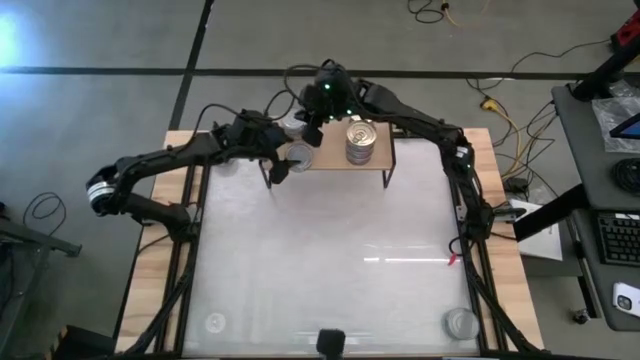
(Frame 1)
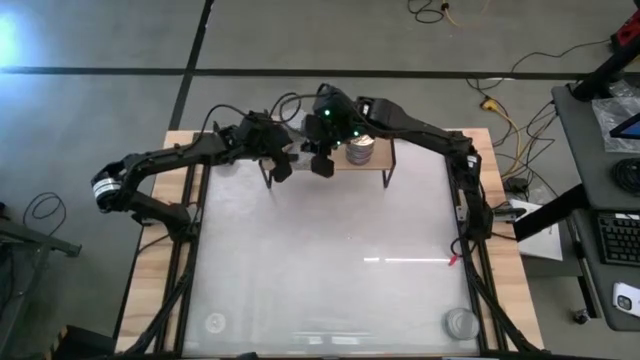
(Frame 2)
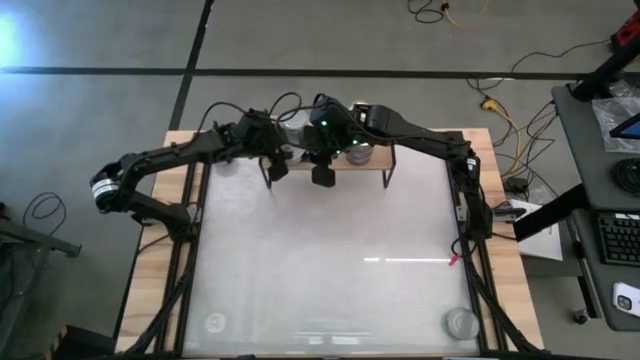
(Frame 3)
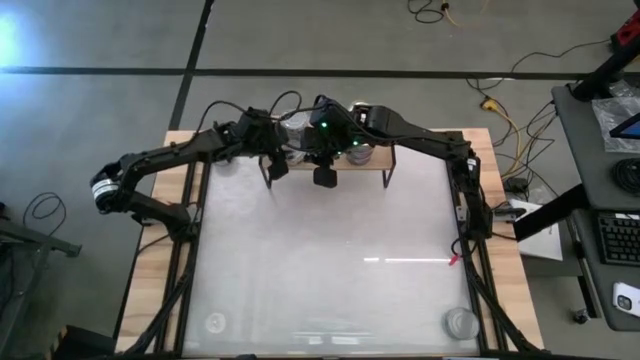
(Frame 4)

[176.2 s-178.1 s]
Task: Stack canned seafood by type on shelf
Adjust the green tuna can on the shelf

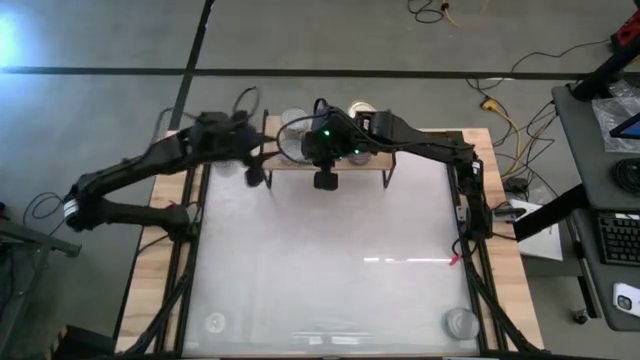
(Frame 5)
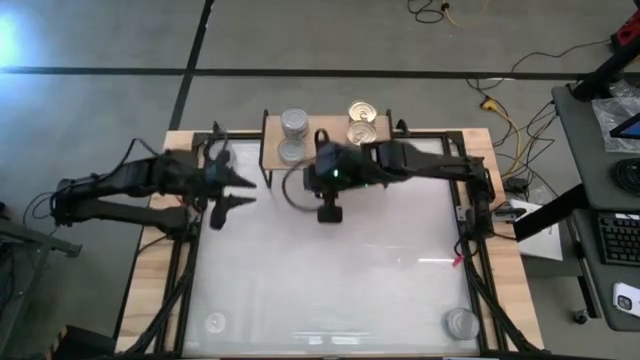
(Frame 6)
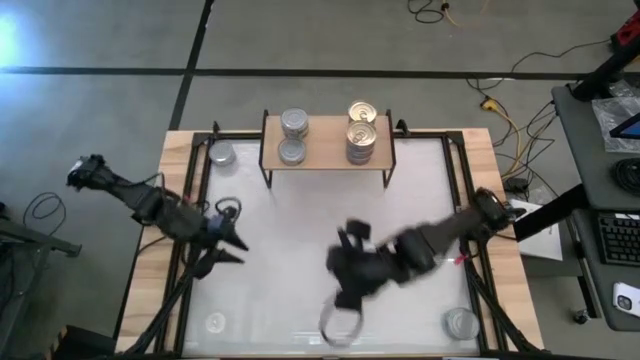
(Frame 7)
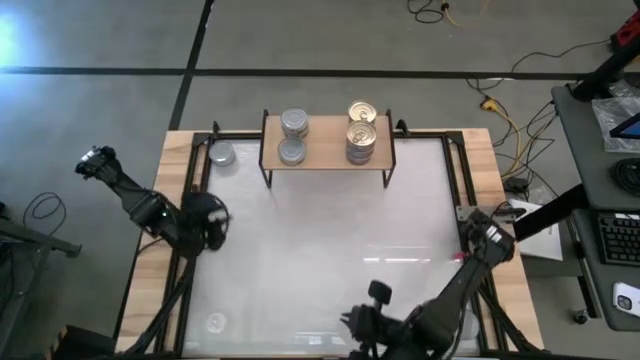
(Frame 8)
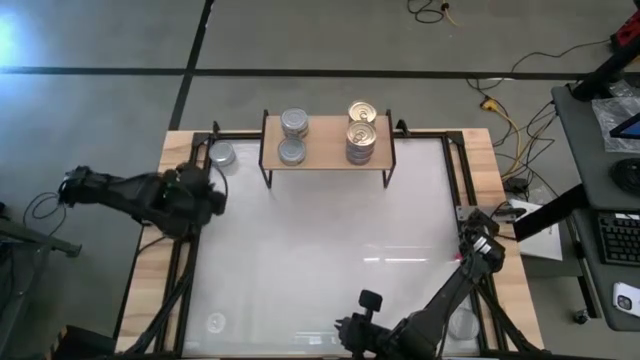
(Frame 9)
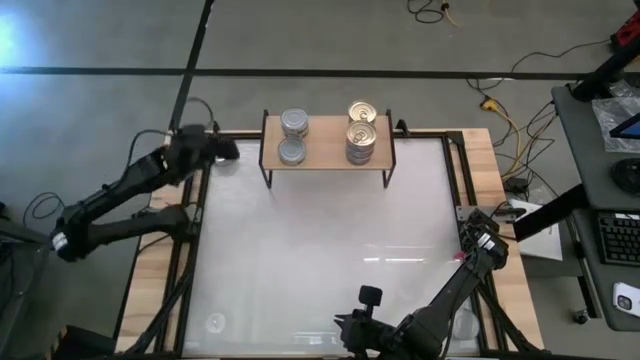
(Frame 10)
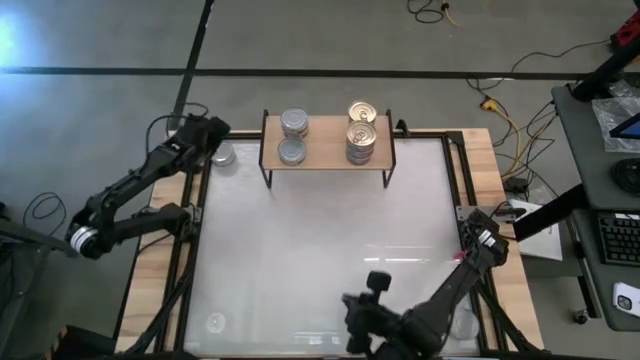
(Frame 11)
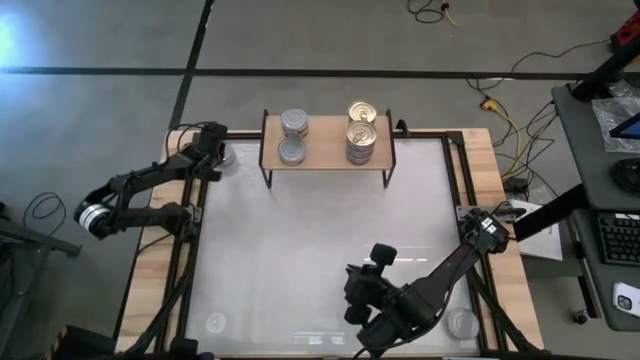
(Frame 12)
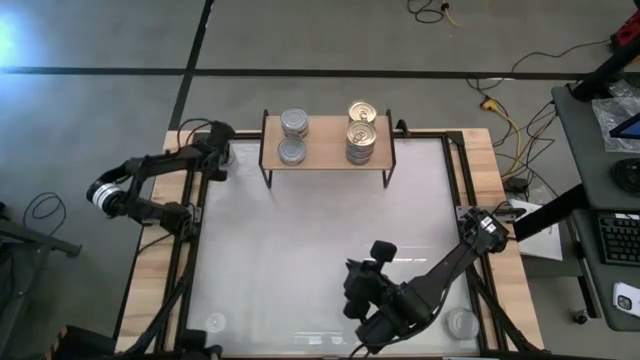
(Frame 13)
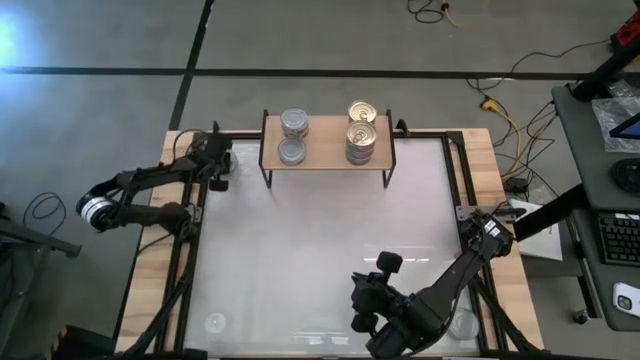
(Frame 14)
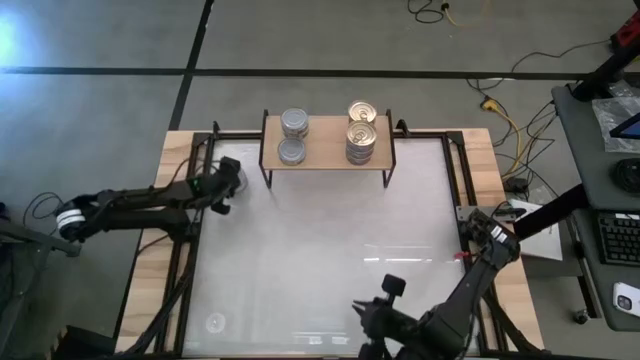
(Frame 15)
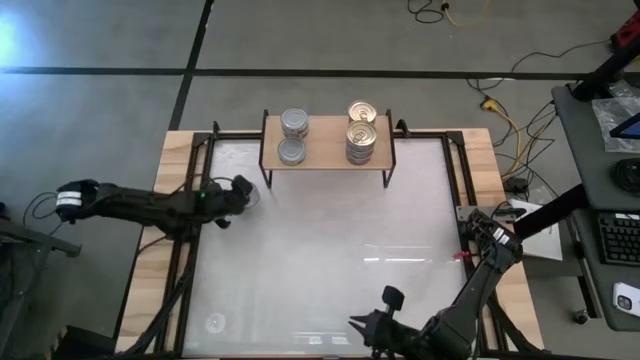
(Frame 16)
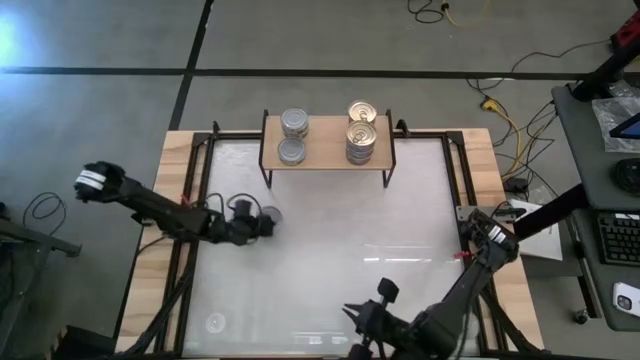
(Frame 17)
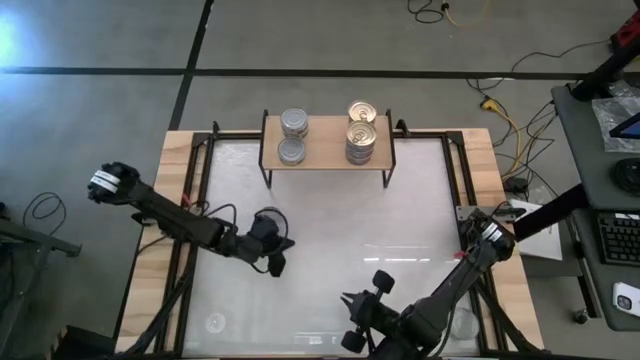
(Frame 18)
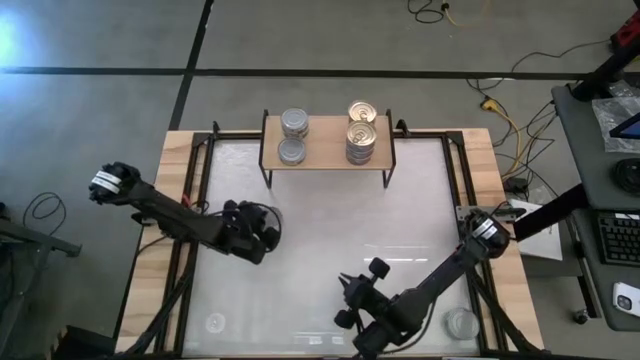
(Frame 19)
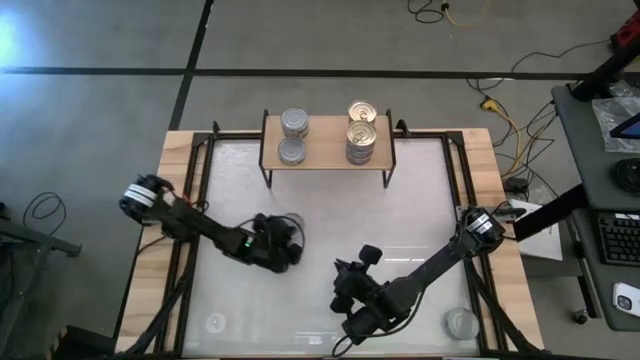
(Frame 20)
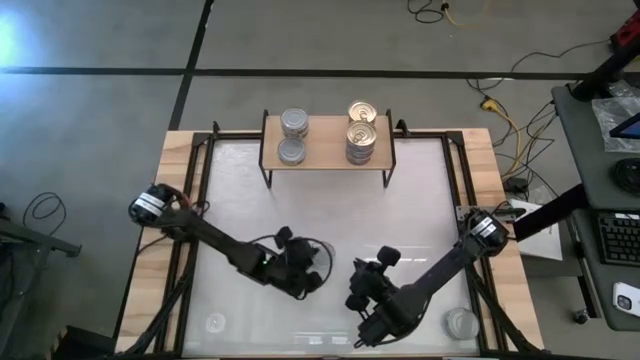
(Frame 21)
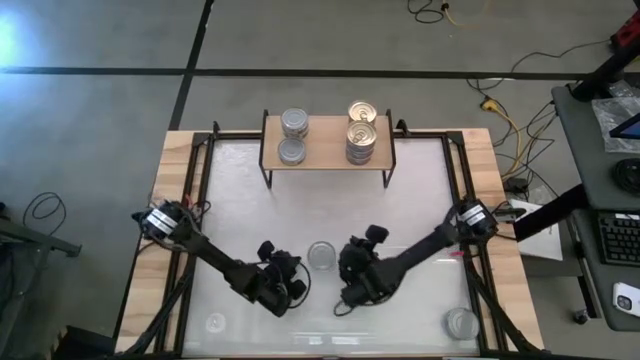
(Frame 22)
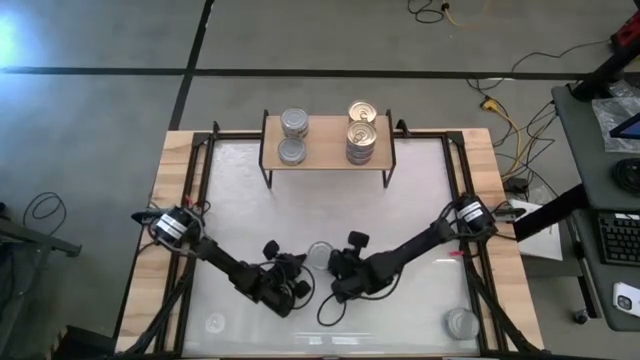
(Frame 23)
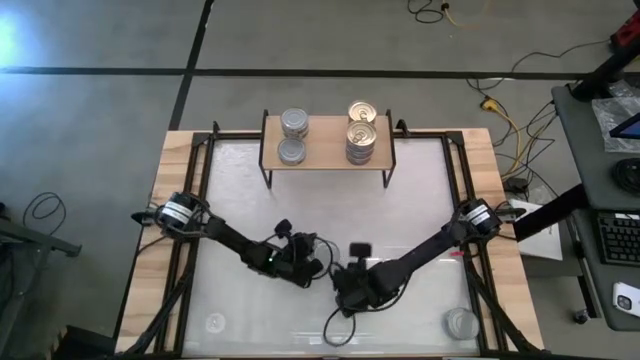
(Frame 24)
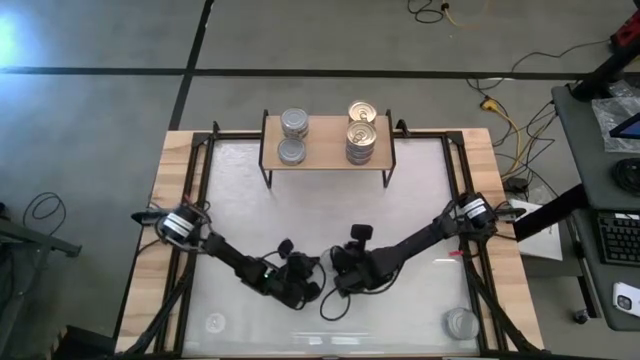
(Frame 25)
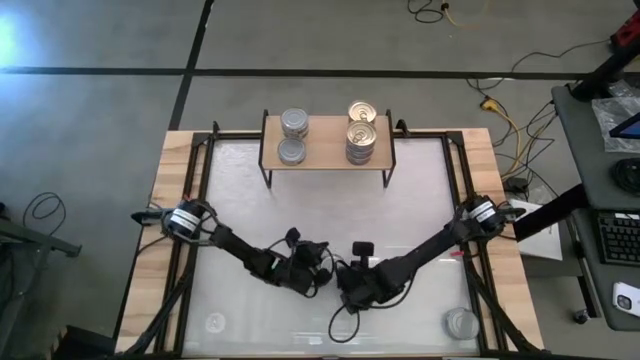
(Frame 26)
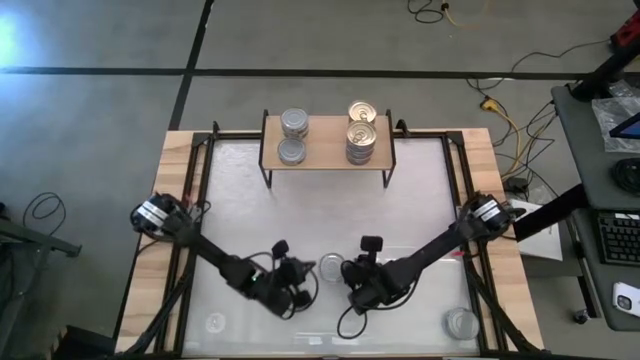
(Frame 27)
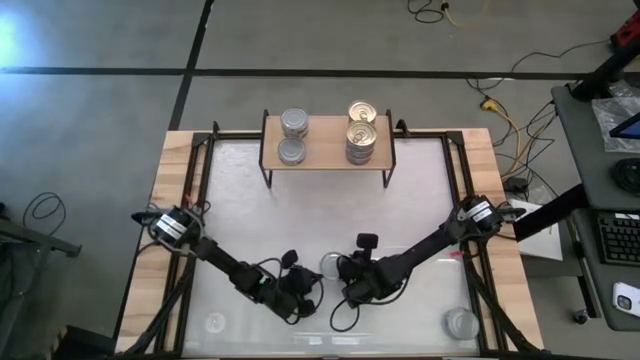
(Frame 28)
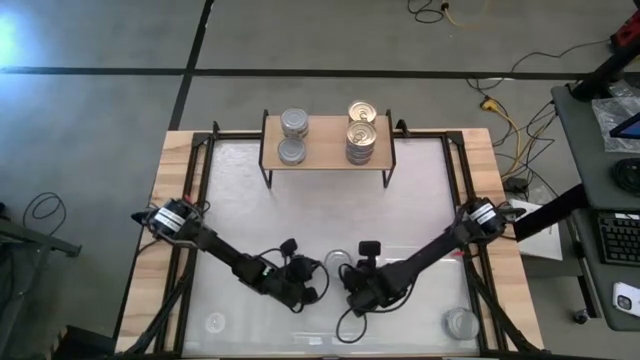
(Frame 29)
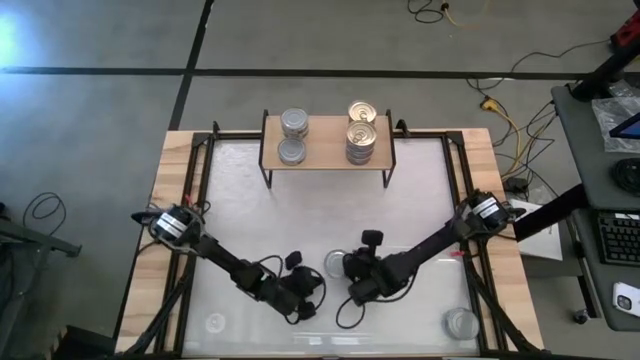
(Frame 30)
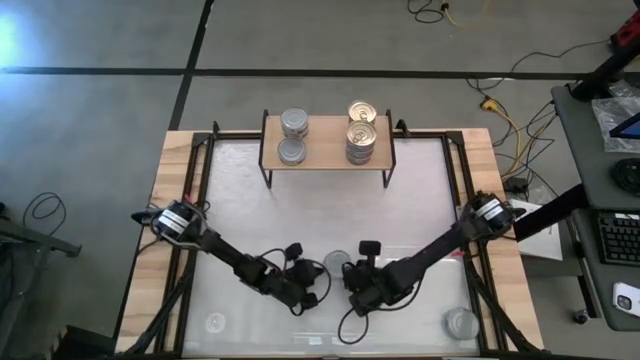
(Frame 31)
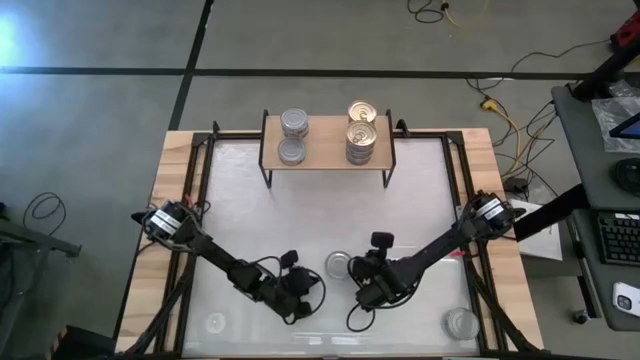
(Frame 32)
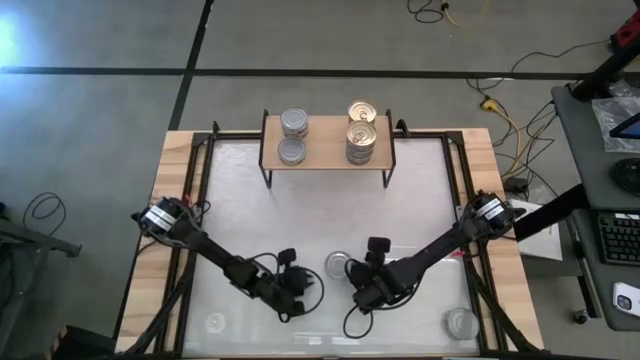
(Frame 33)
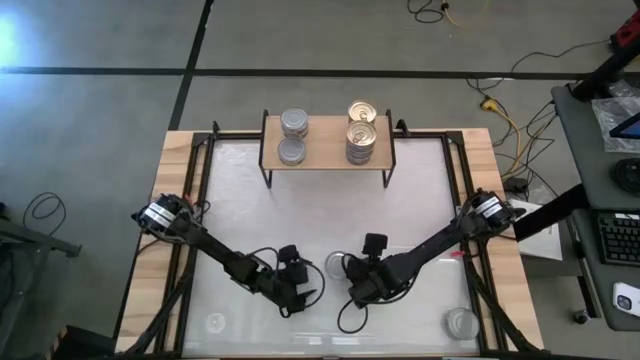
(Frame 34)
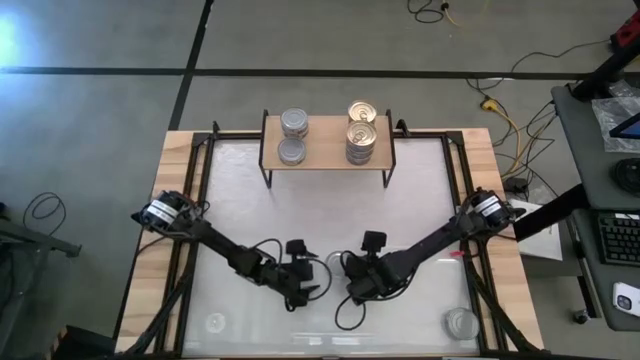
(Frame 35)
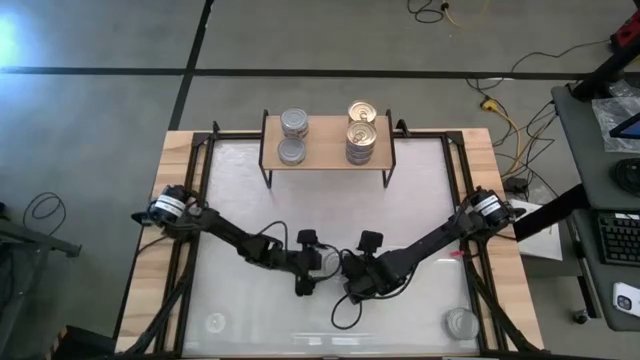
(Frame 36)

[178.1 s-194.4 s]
Stack the green tuna can on top of the green tuna can on the shelf

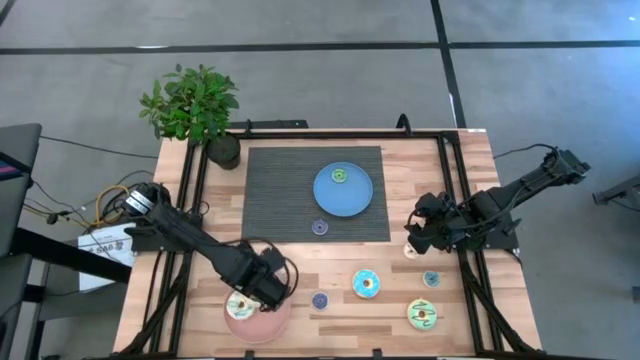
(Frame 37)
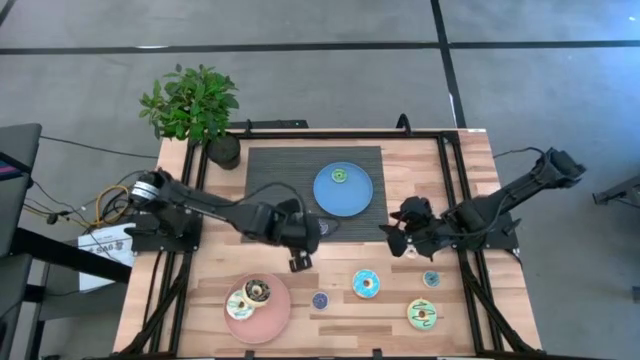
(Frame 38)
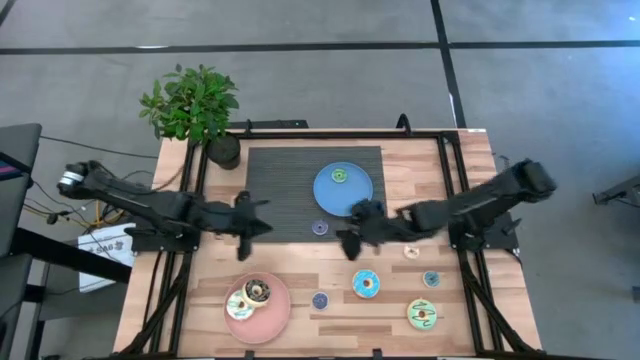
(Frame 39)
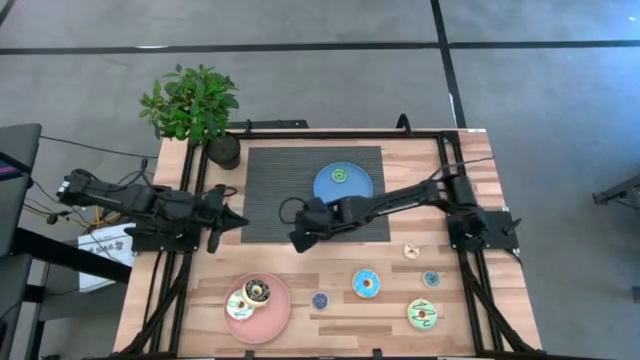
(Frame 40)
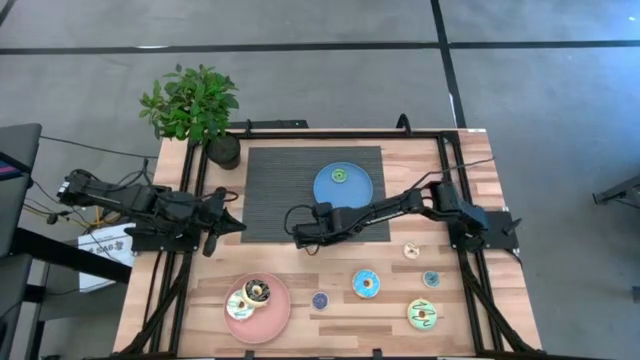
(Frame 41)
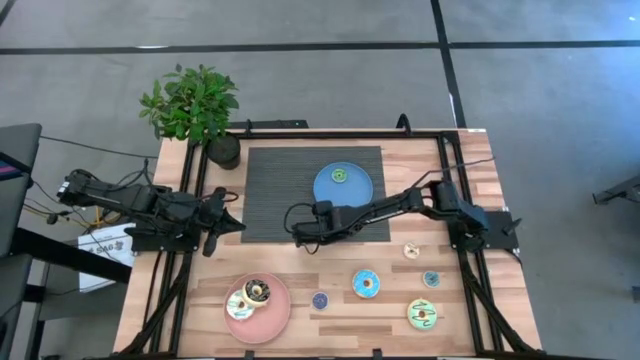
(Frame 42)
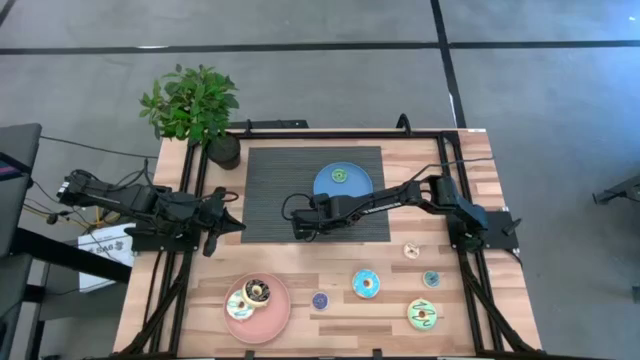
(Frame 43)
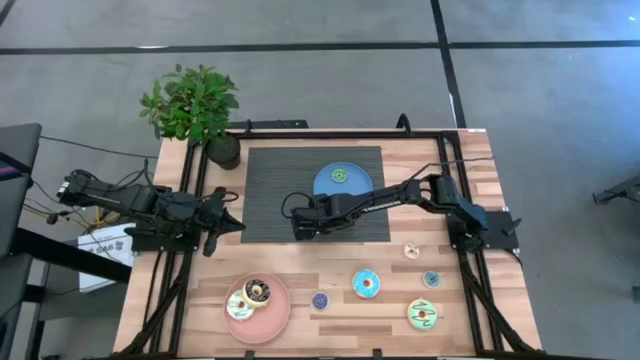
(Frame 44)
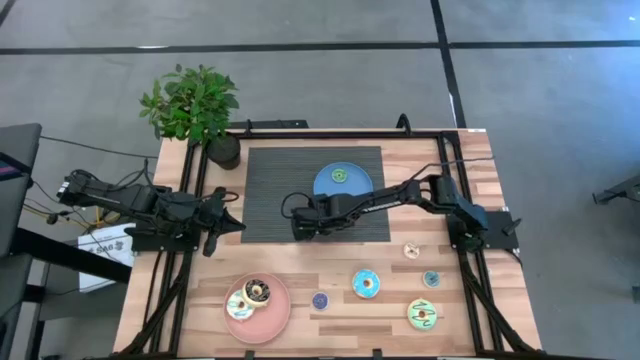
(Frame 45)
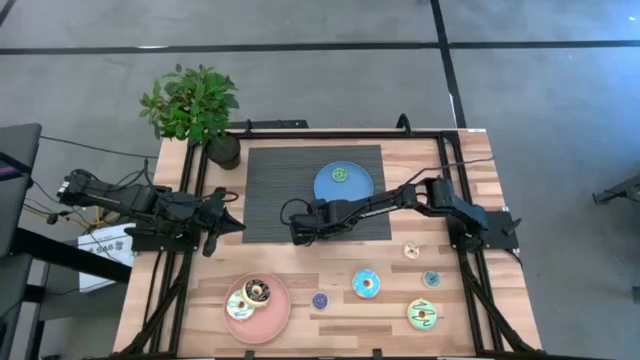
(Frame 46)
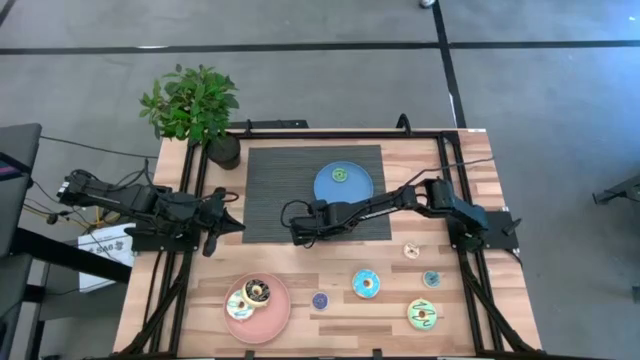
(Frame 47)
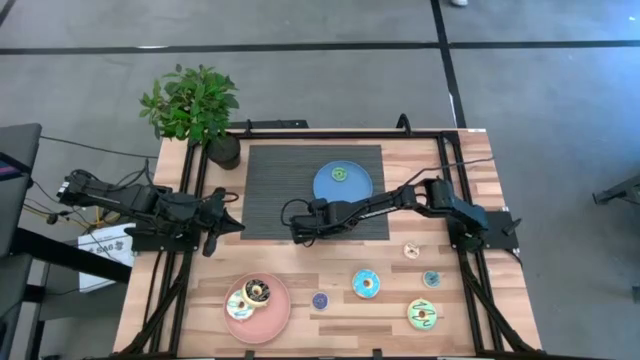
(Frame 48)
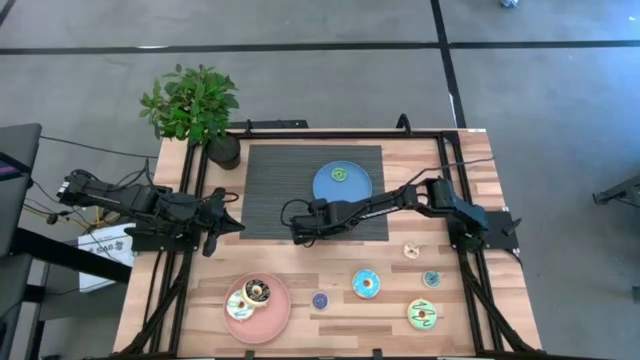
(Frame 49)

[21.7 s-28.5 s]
Task: Pick & Place donuts
Put the top small purple donut on the blue plate
